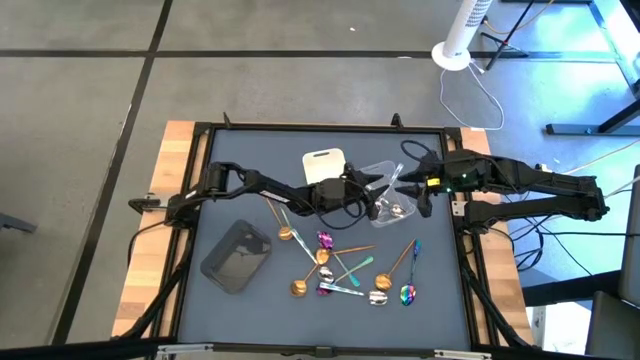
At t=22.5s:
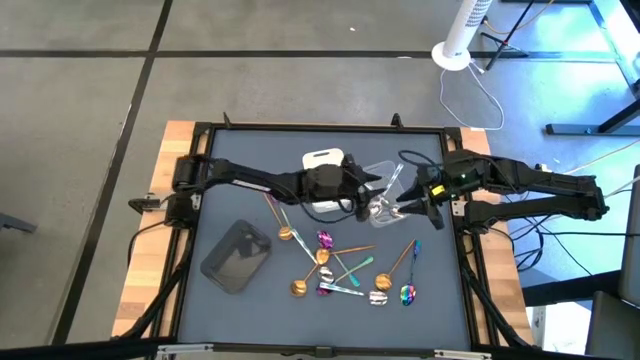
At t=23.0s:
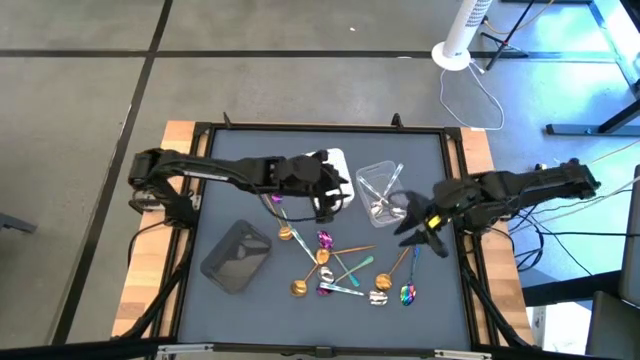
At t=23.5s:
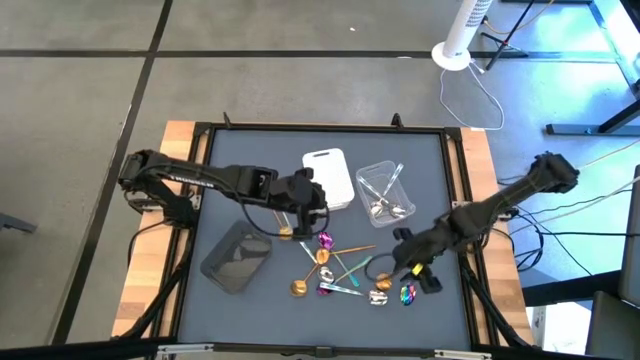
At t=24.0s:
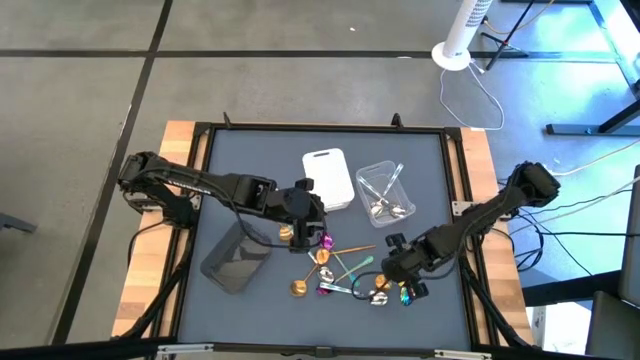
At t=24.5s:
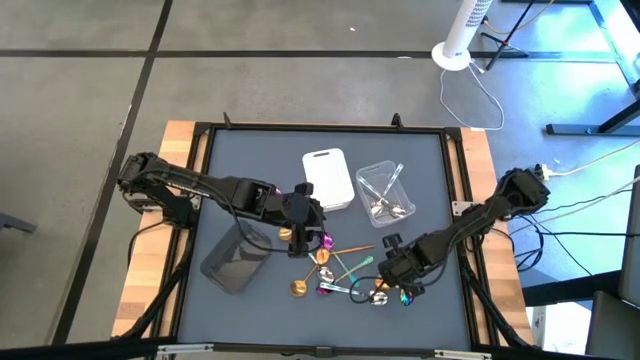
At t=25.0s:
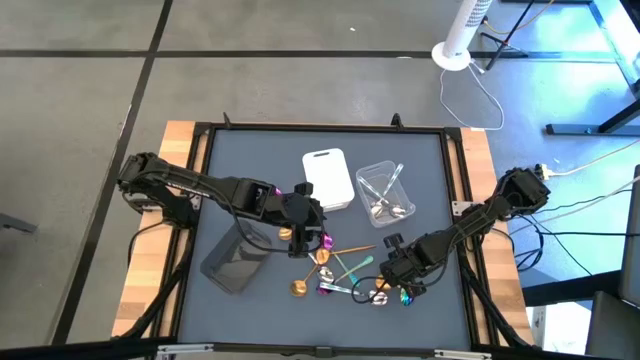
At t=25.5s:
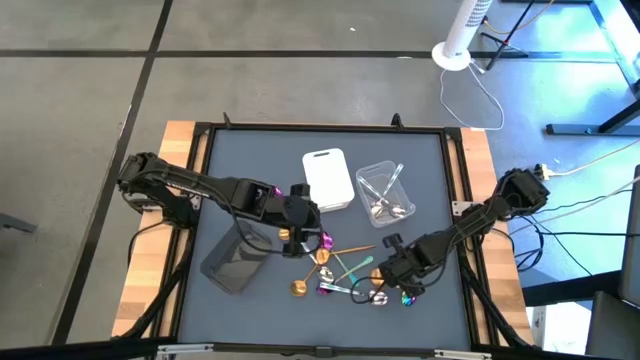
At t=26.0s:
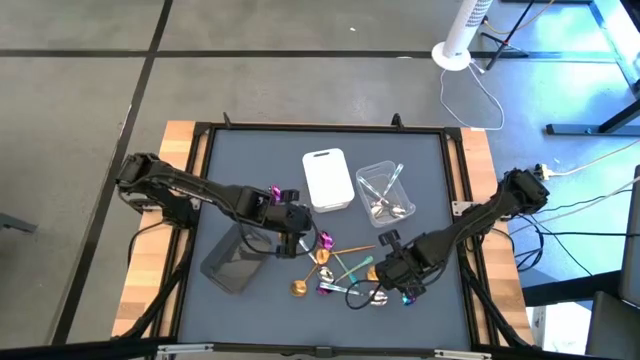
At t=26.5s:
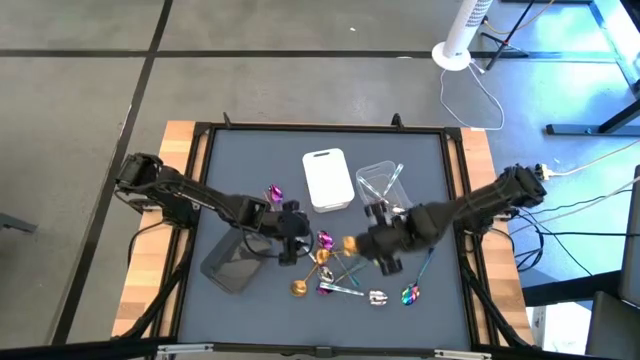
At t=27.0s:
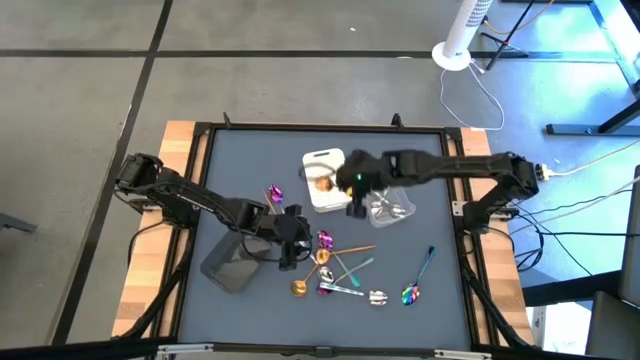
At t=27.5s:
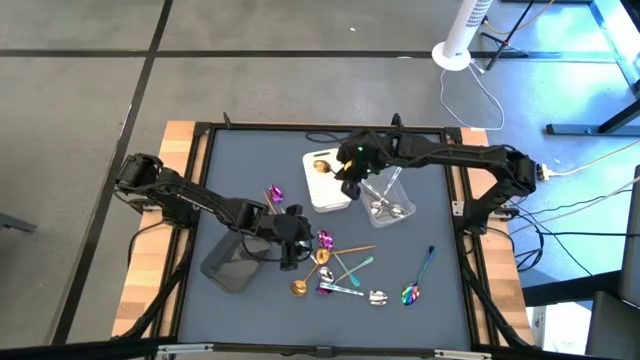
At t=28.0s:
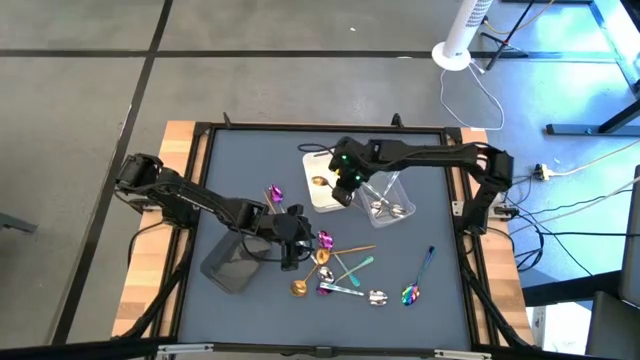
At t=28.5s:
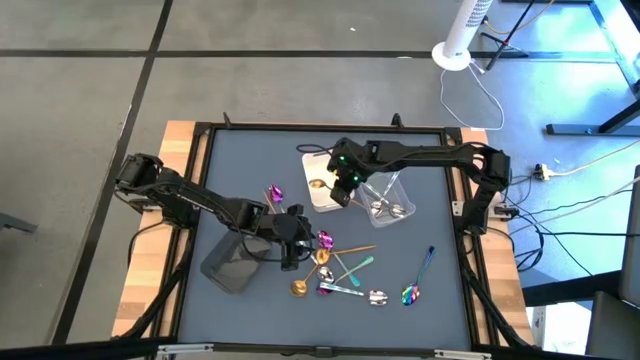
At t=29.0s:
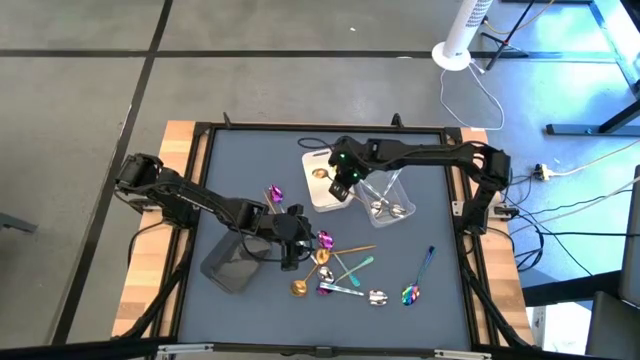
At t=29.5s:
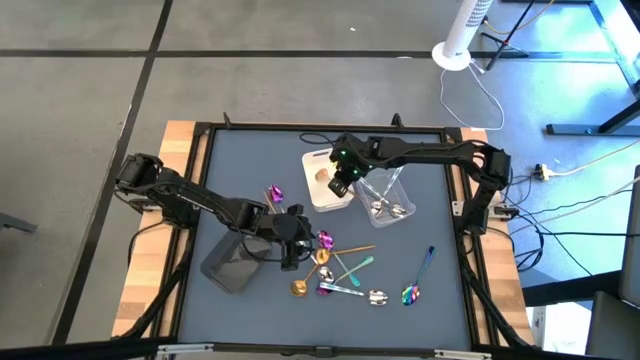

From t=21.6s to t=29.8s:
Task: Sort silverware by color (type)
Put the gold spoon into the white bin

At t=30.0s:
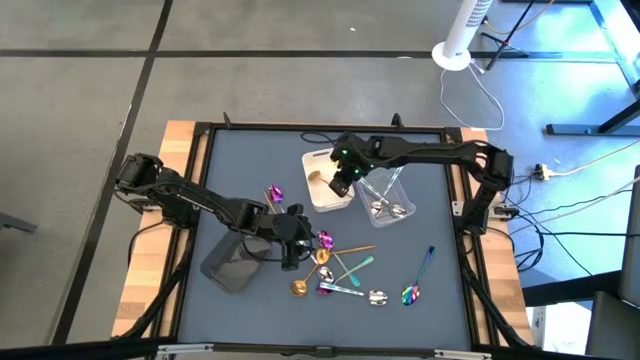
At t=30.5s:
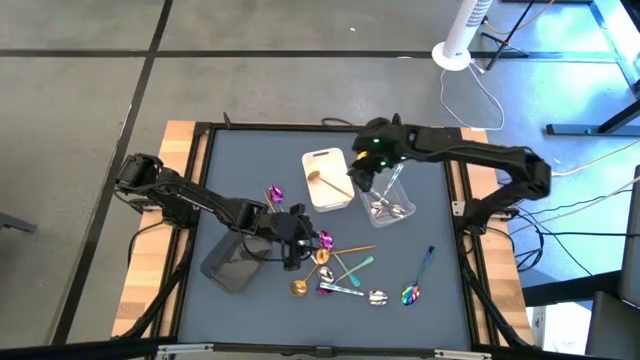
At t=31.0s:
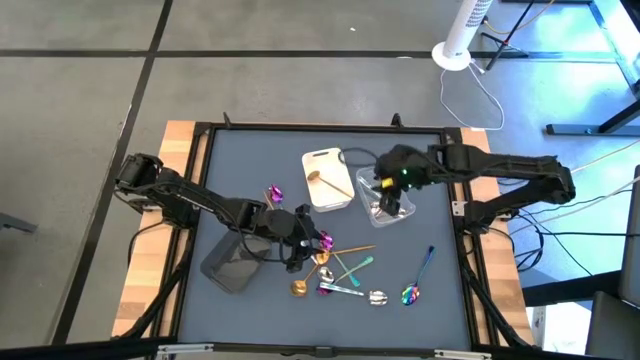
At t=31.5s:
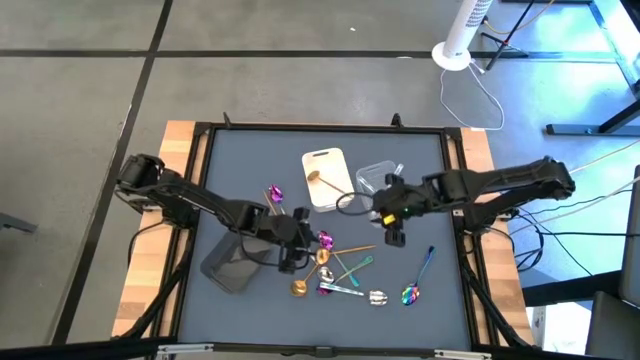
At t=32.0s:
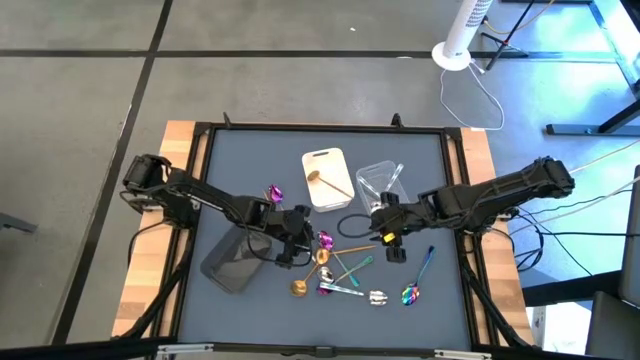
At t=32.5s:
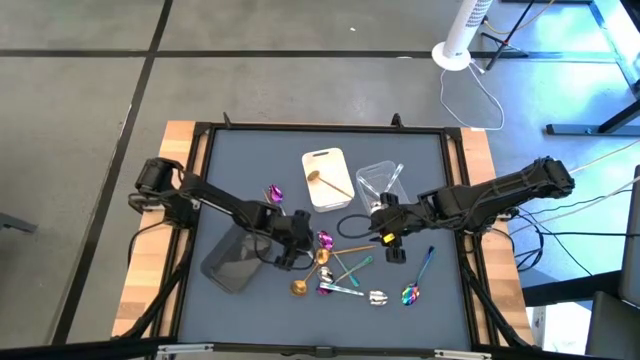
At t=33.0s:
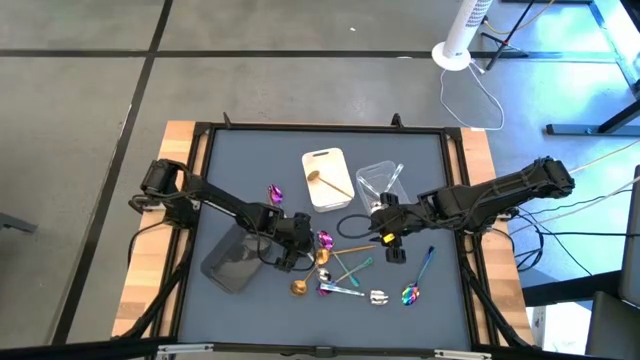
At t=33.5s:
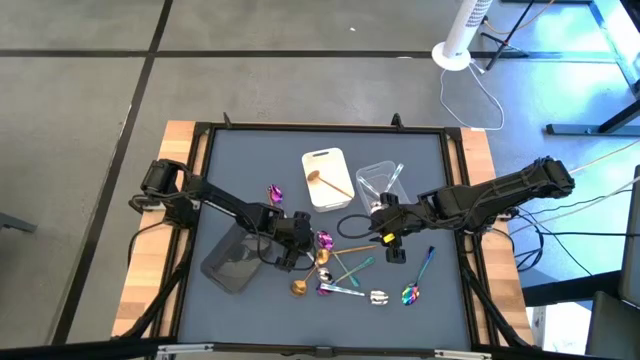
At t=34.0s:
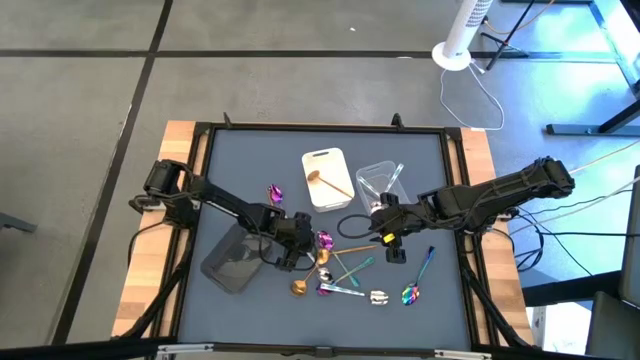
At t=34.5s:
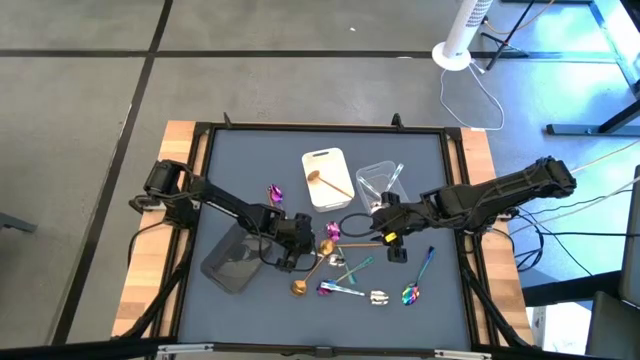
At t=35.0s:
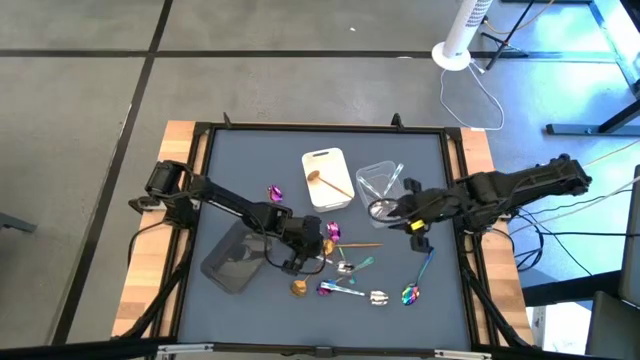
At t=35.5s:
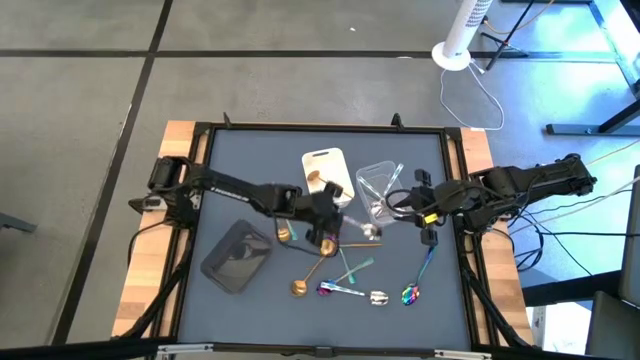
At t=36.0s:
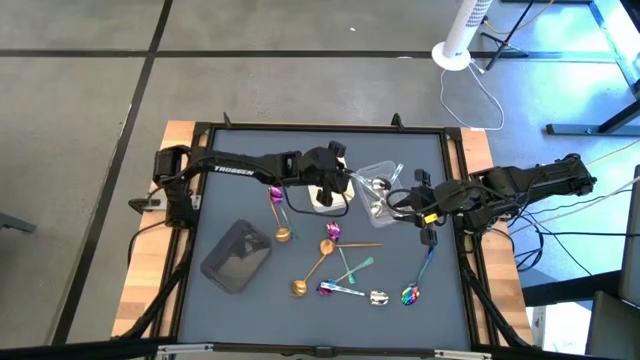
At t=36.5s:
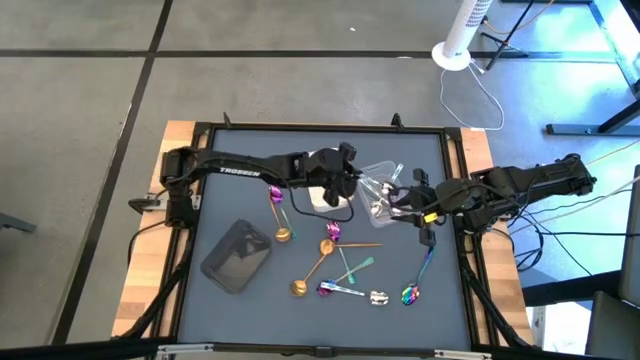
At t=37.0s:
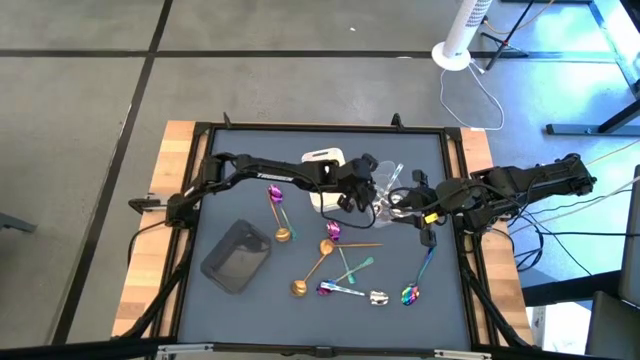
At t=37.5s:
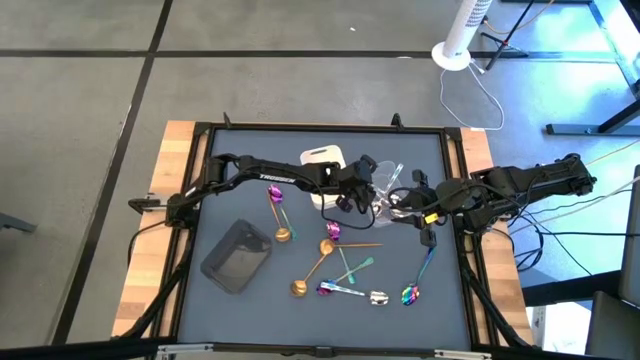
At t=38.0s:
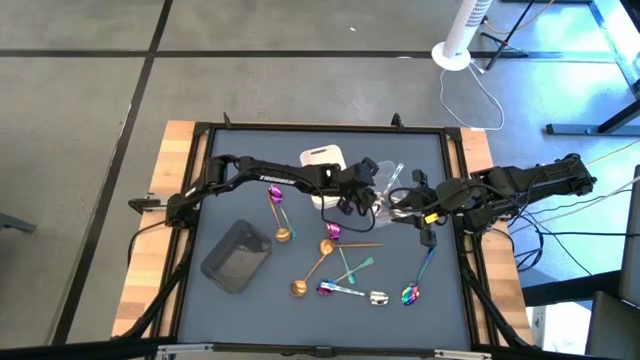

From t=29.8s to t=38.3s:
Put the green spoon into the transparent bin

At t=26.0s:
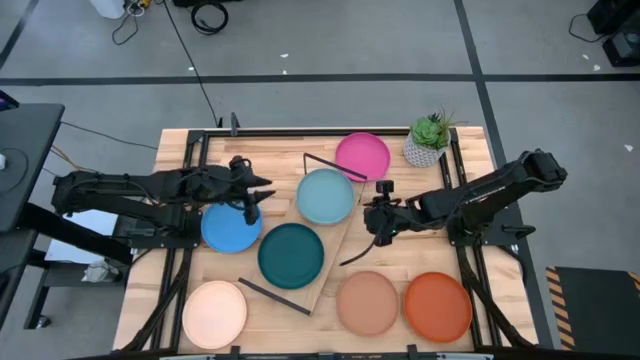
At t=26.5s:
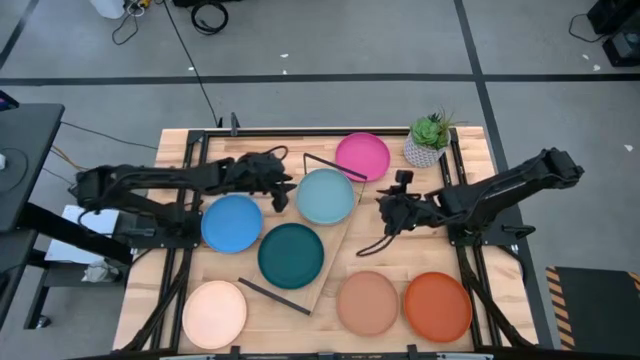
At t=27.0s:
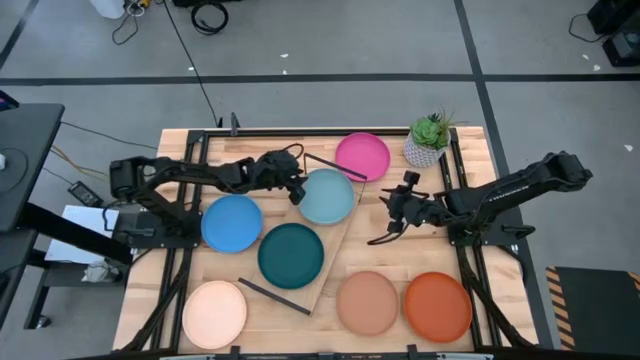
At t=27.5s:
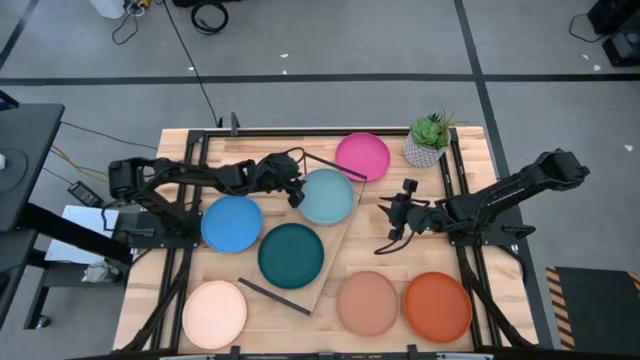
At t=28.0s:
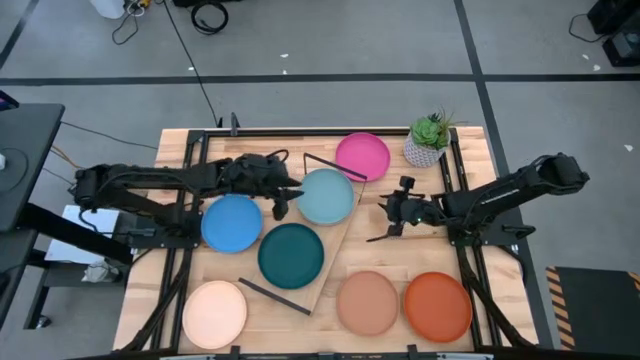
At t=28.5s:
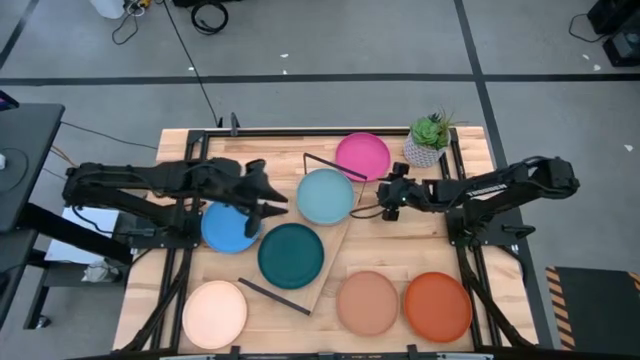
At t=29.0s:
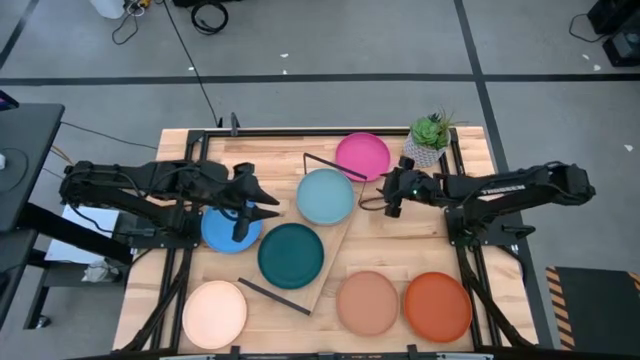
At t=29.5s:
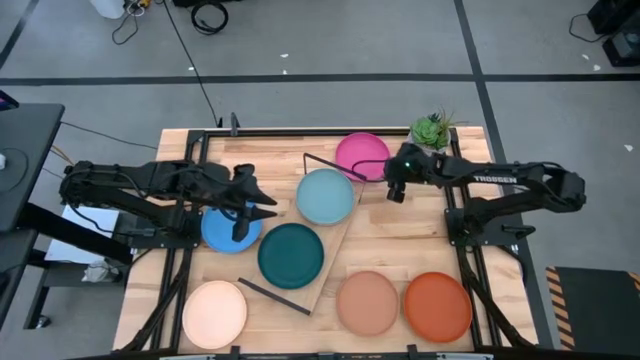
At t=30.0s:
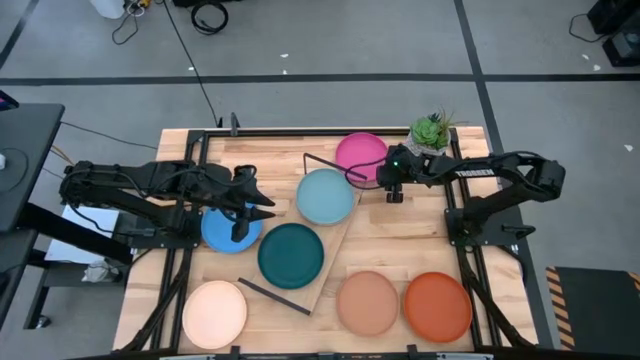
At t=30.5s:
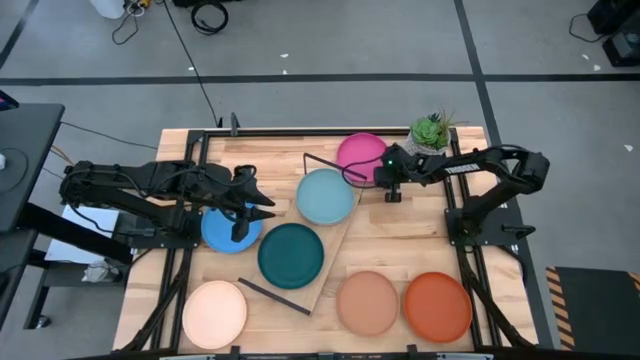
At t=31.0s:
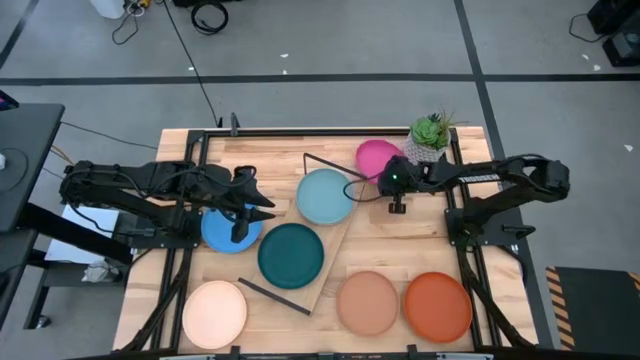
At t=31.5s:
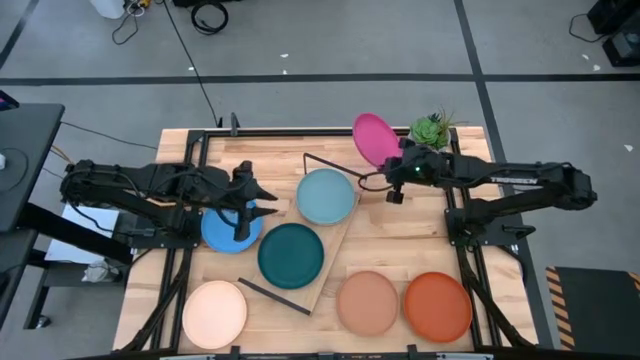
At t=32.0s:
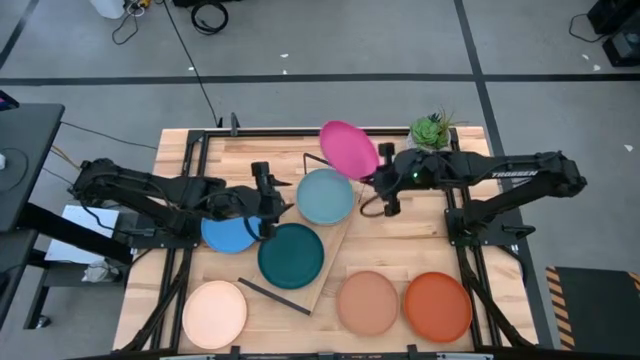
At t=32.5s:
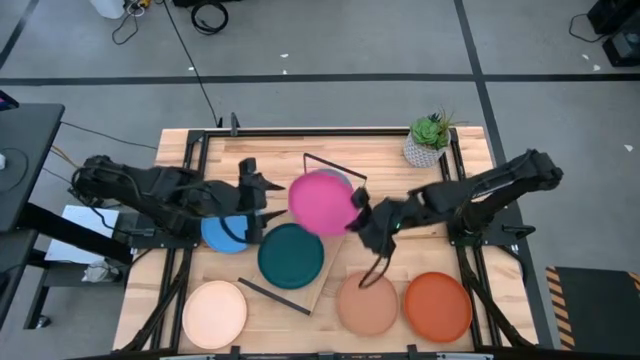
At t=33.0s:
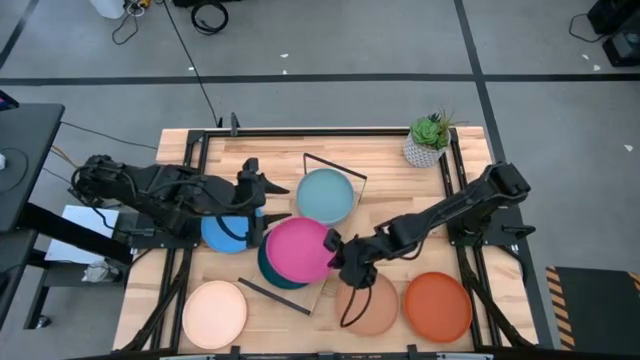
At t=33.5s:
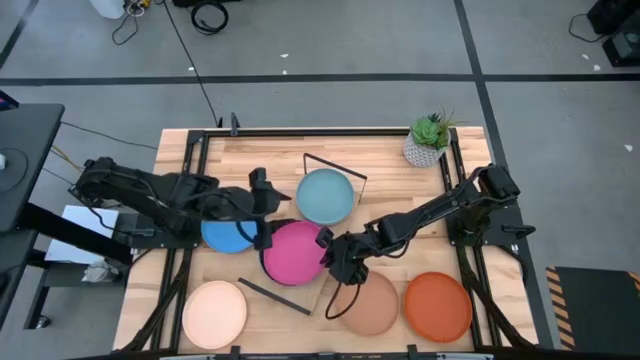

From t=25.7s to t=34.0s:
Task: Place and stack plates onto a shelf
Stack the pink plate on top of the dark green plate
